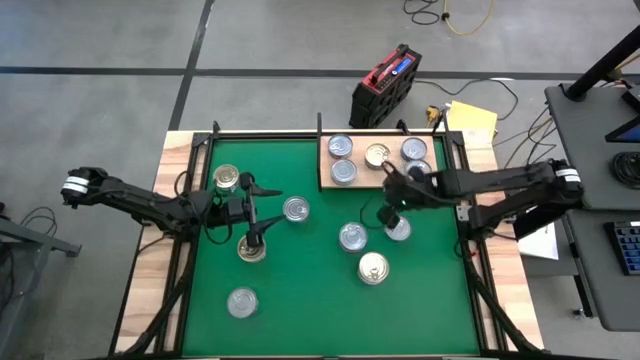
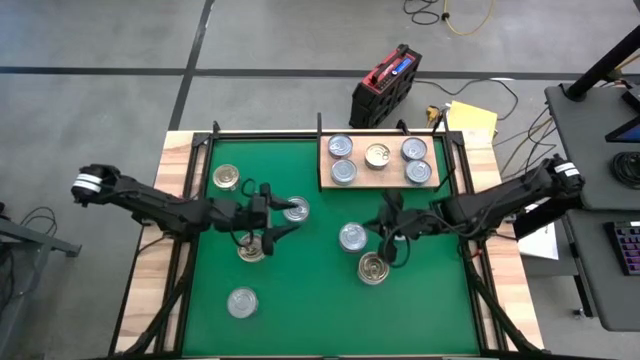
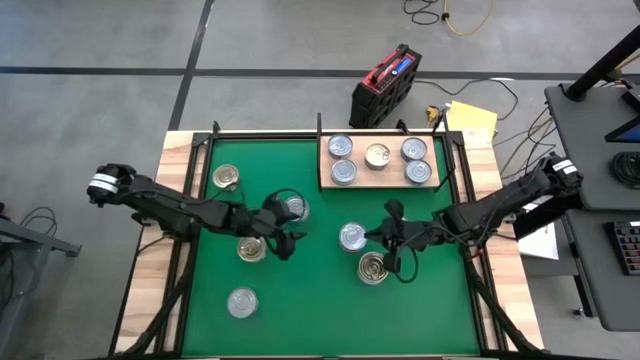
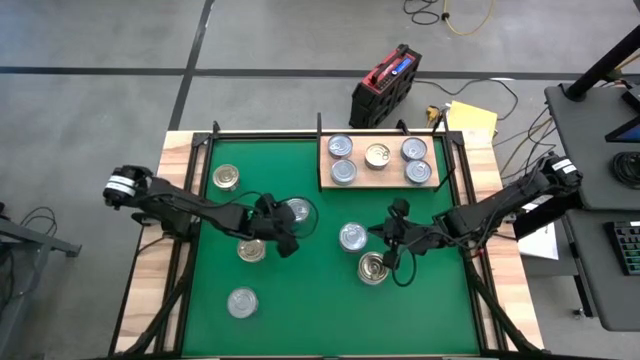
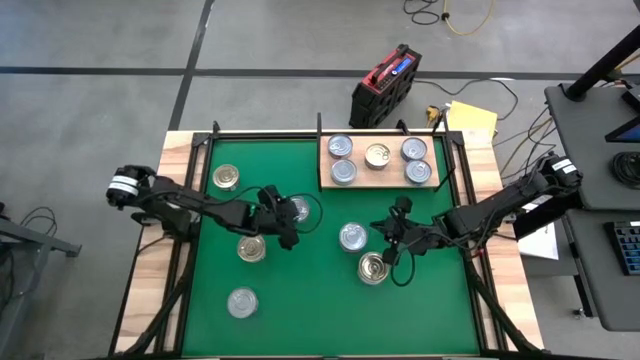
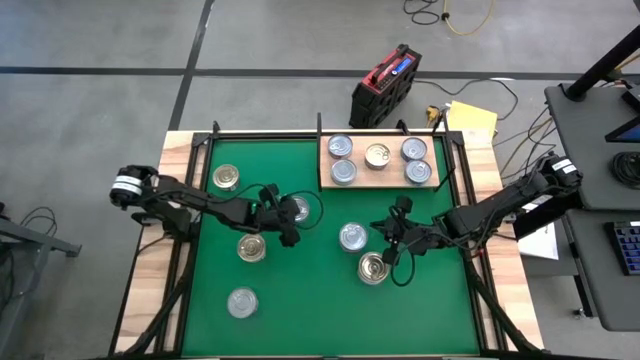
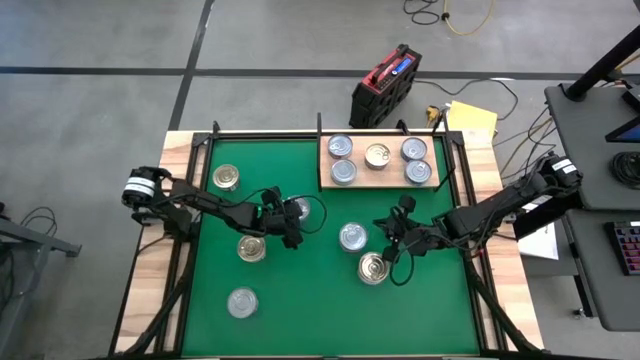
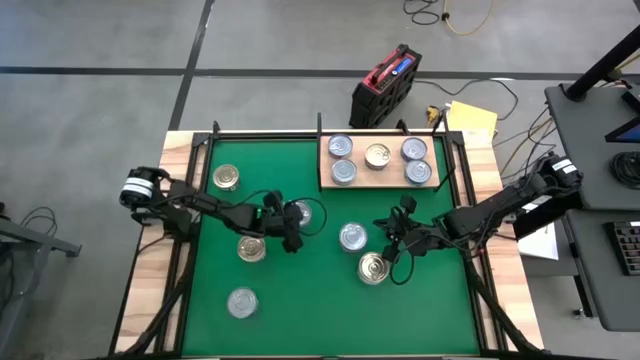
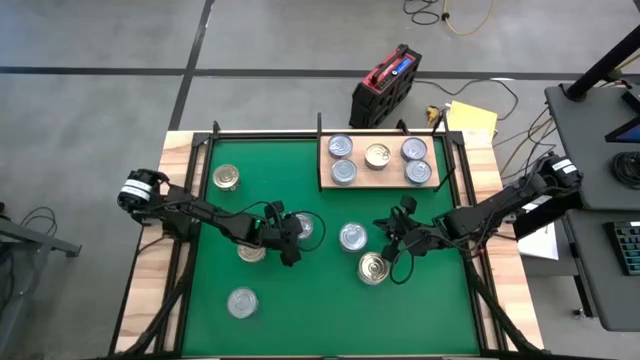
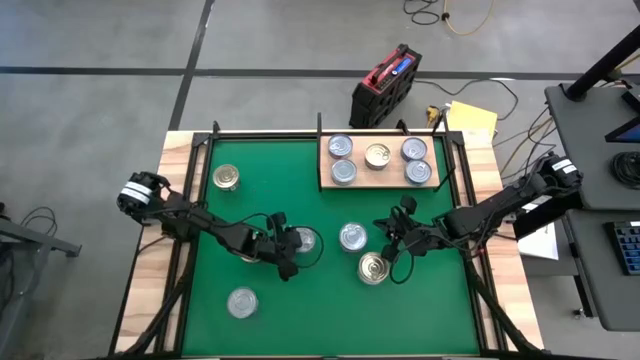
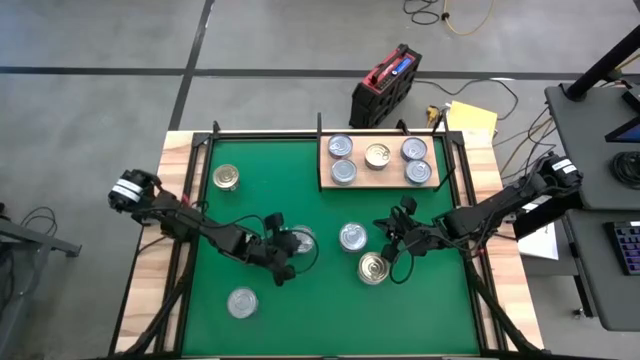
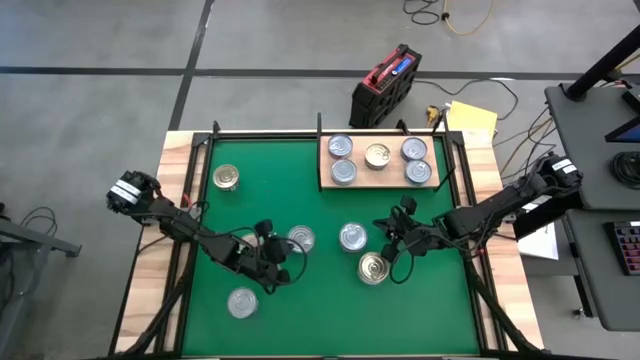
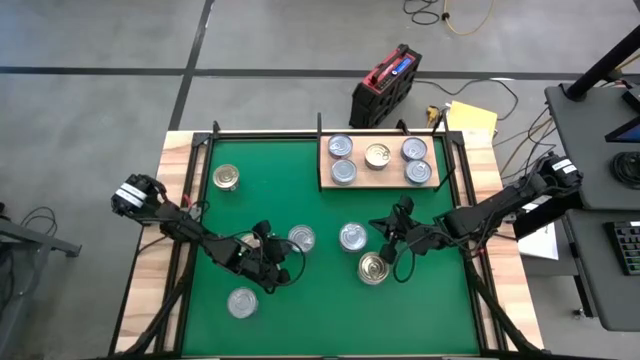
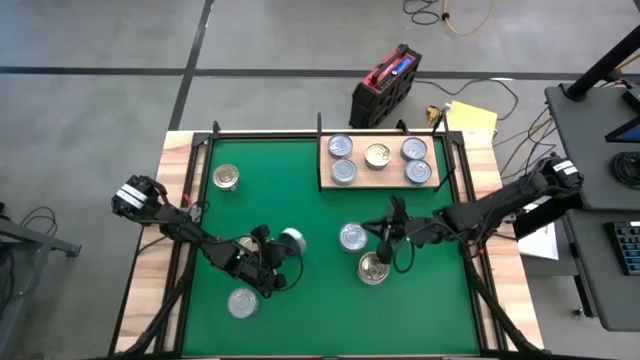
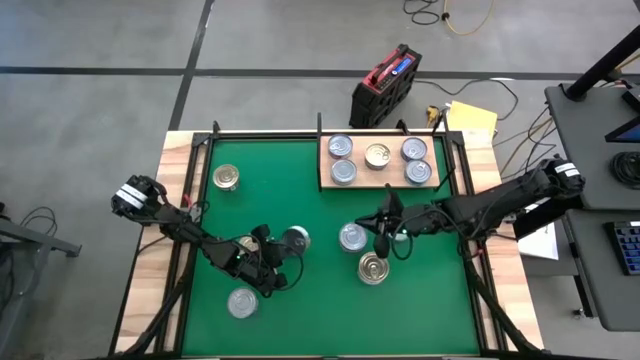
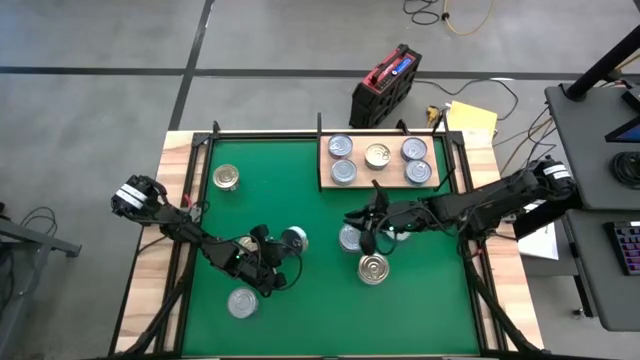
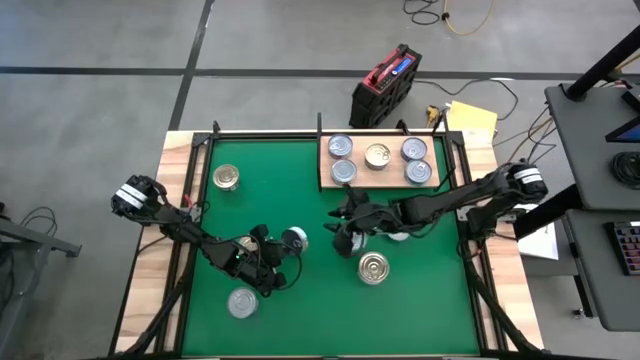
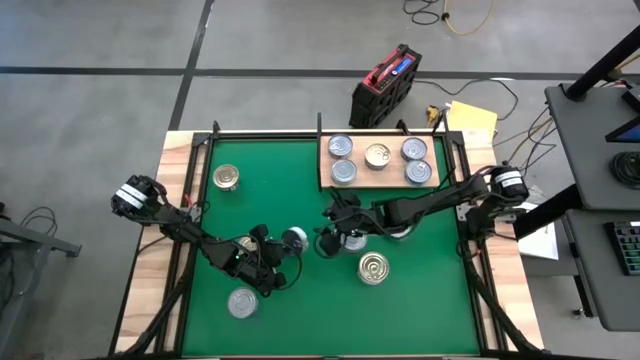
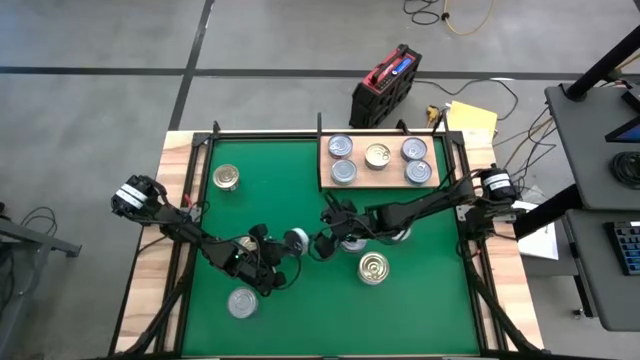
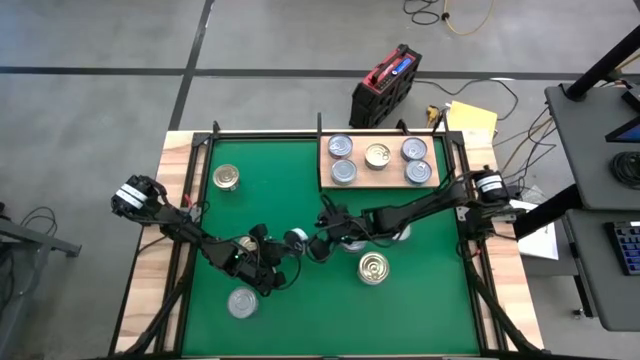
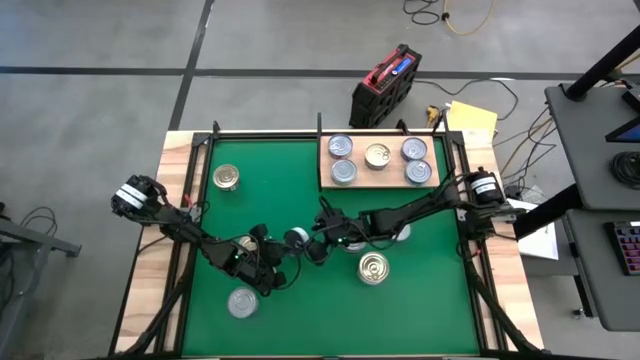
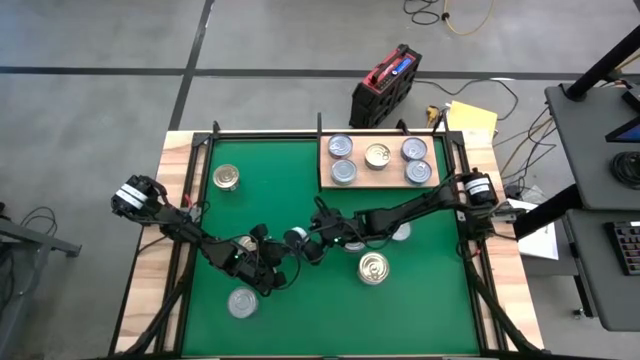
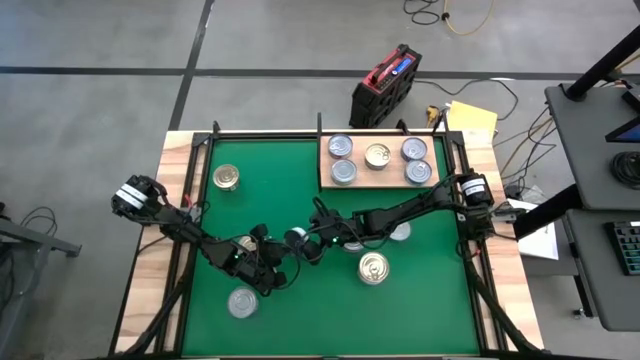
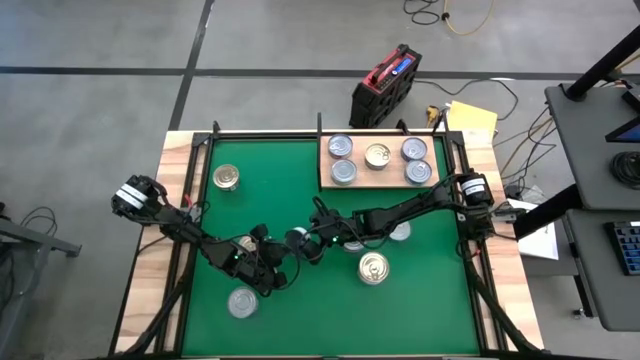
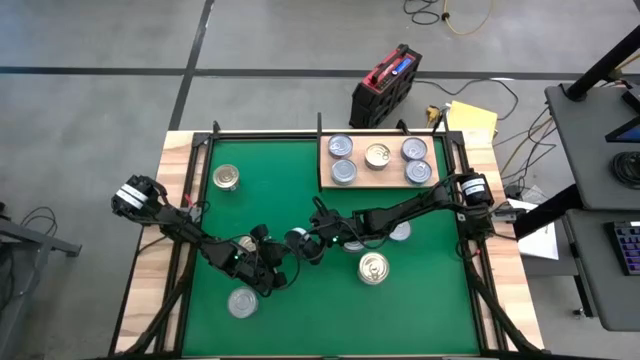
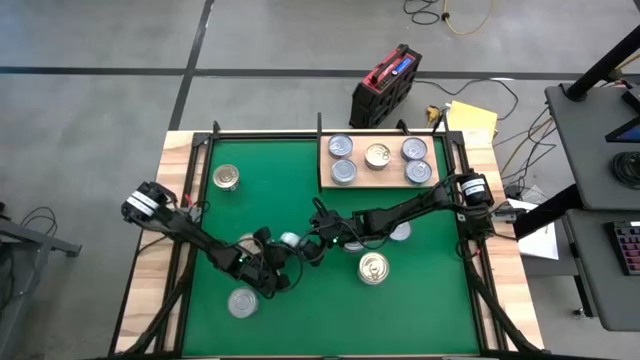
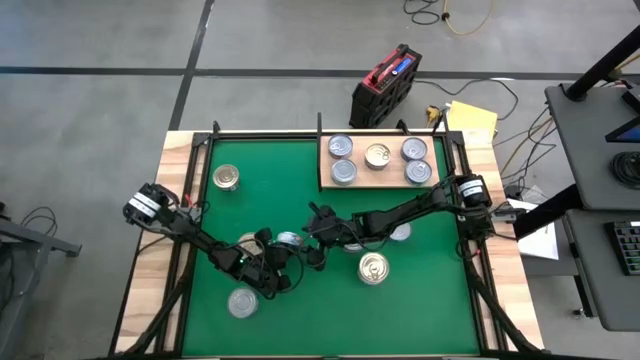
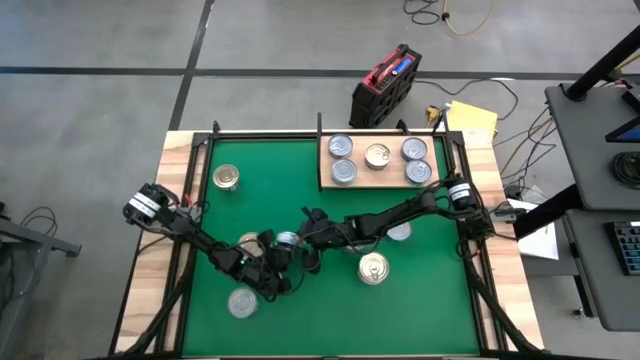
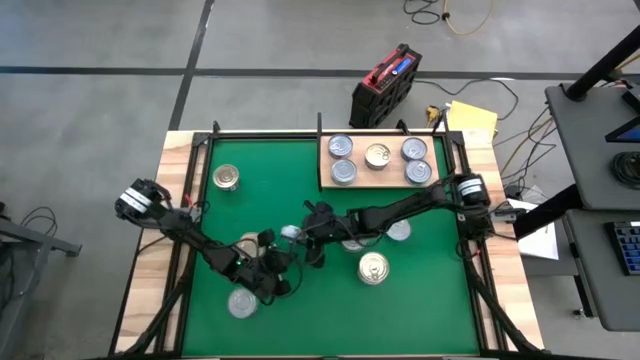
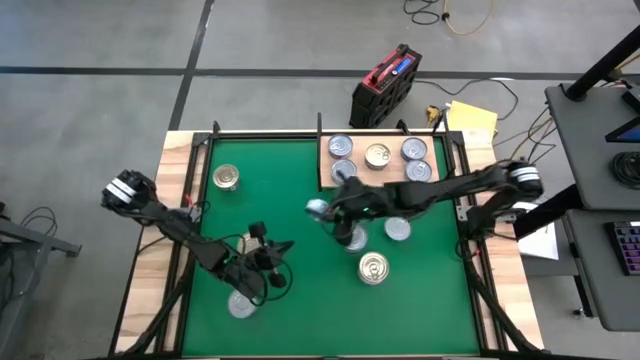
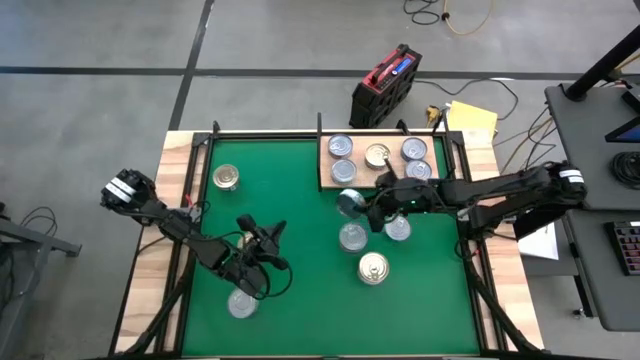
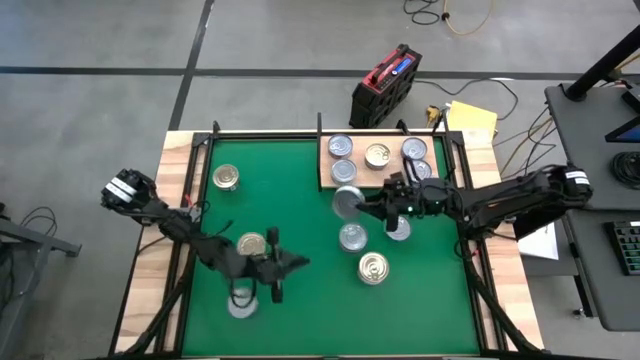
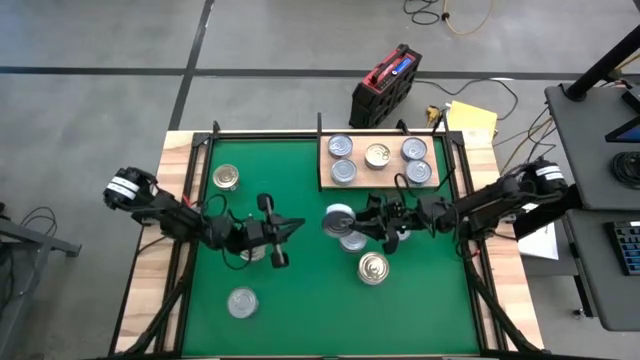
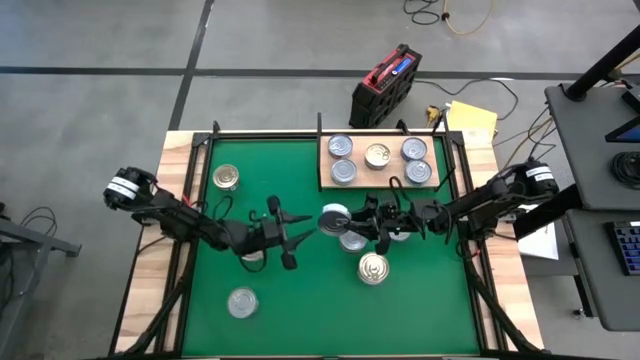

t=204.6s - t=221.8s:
Task: Stack canned seafood by type on shelf
Put the green and blue tuna on the shelf

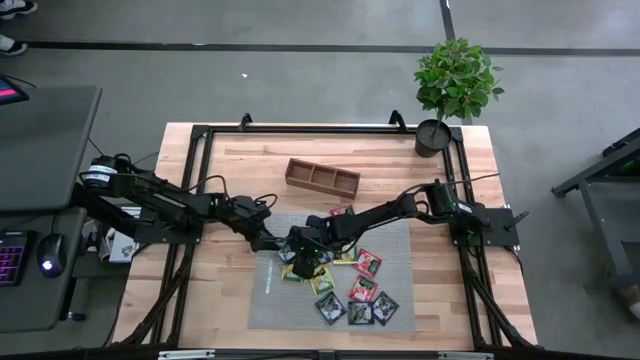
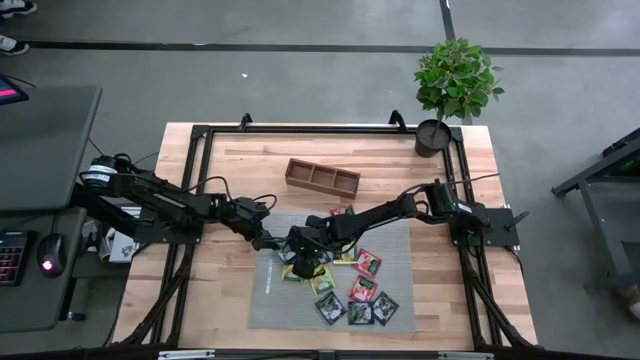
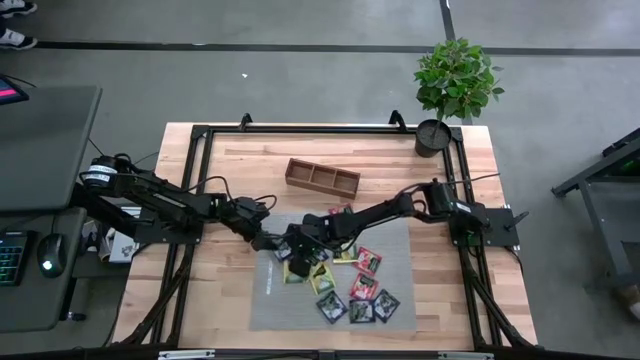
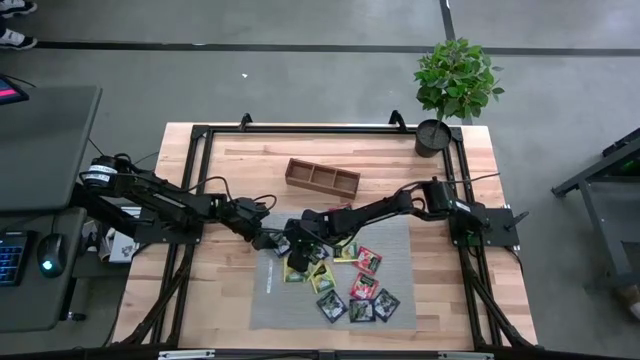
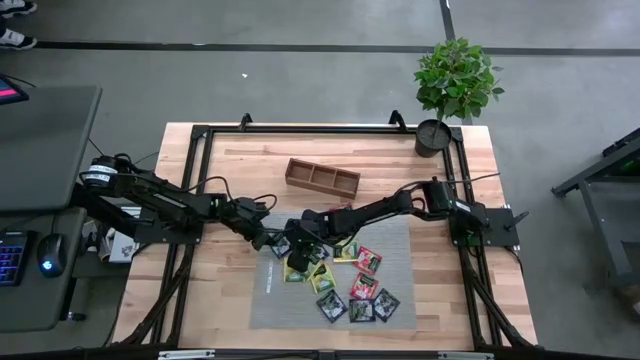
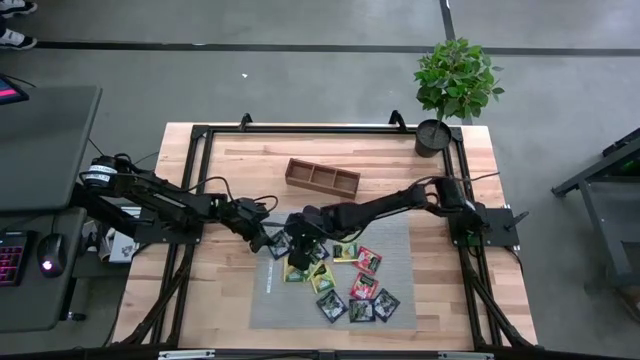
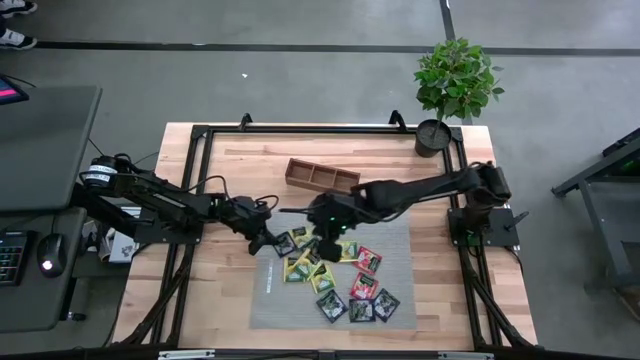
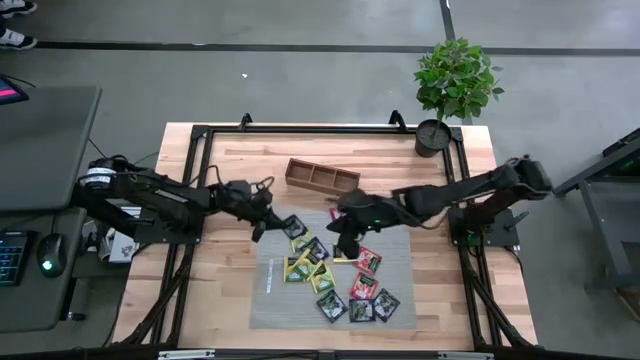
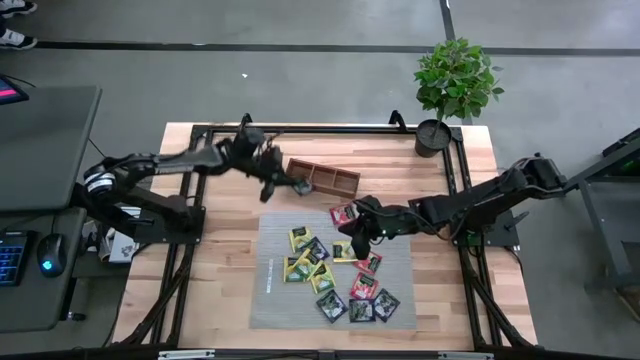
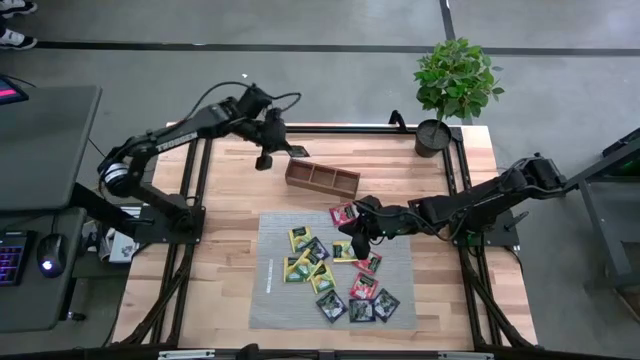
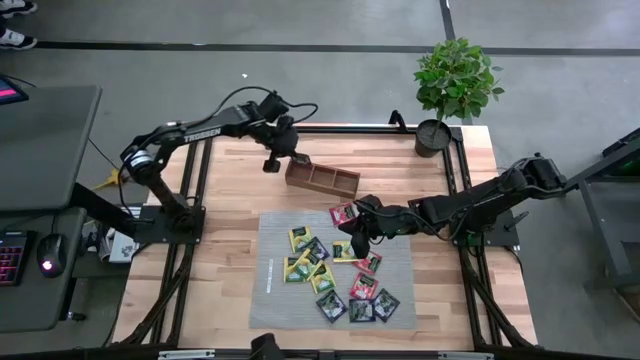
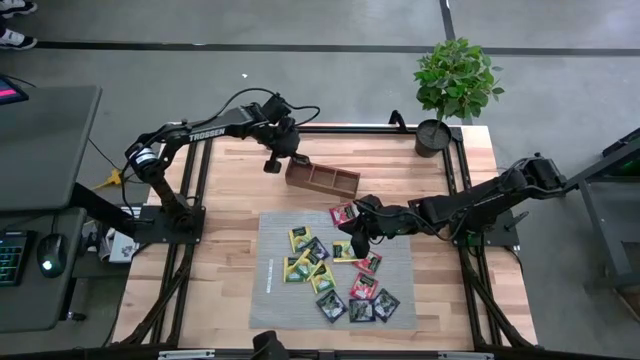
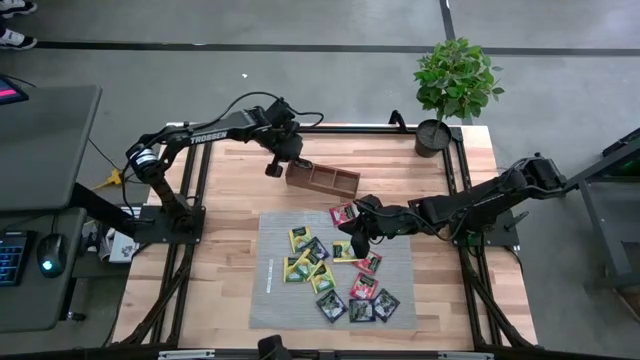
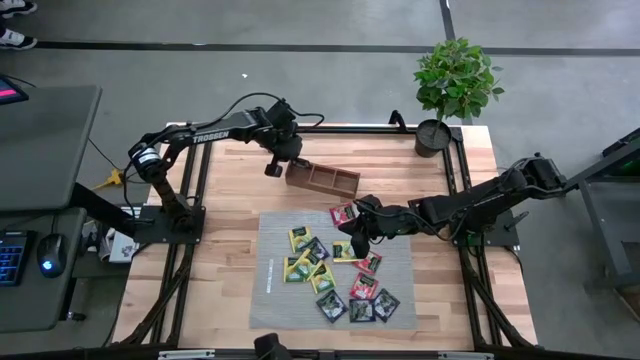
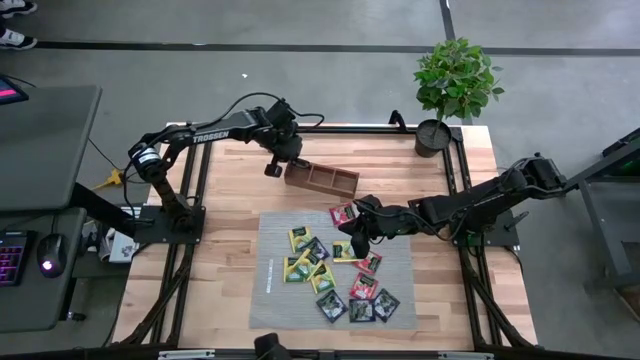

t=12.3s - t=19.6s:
Task: Pick & Place Tea
Put the purple tea bag into the left section of the wooden organizer
